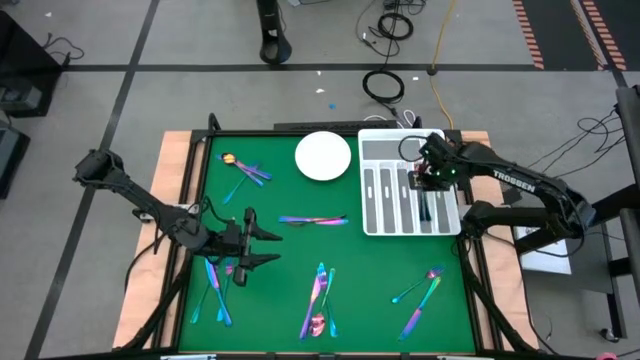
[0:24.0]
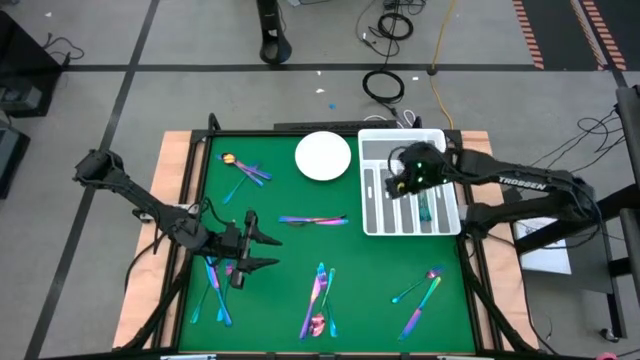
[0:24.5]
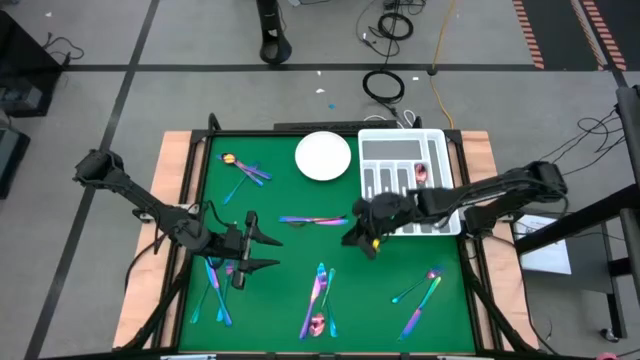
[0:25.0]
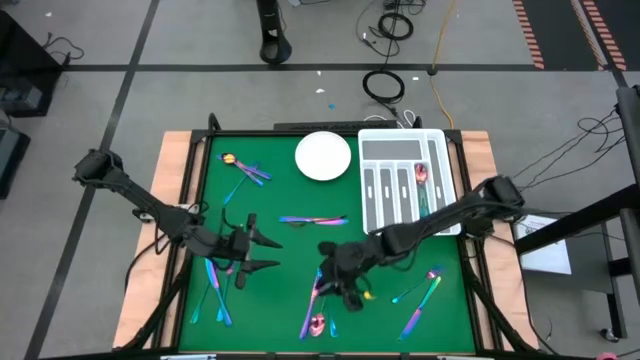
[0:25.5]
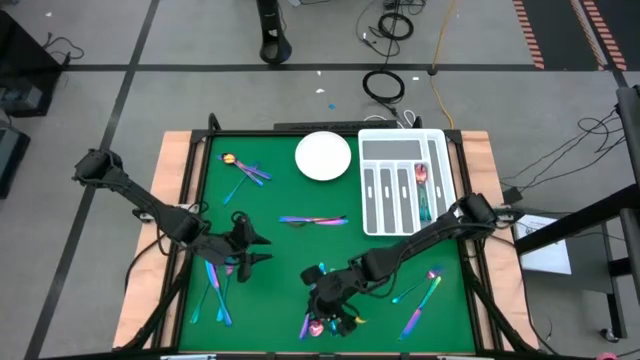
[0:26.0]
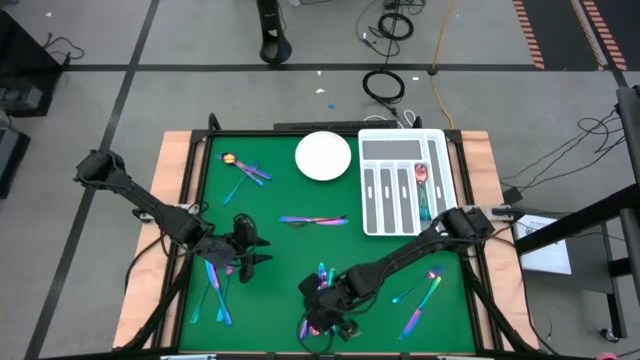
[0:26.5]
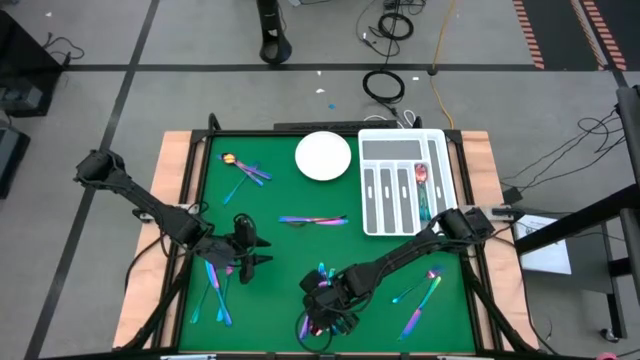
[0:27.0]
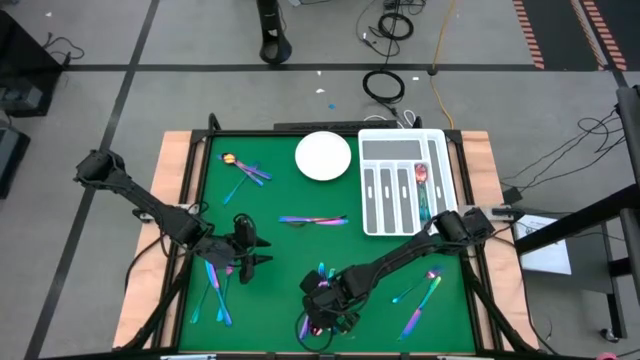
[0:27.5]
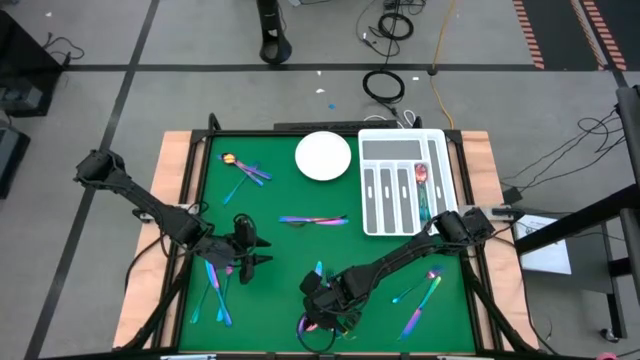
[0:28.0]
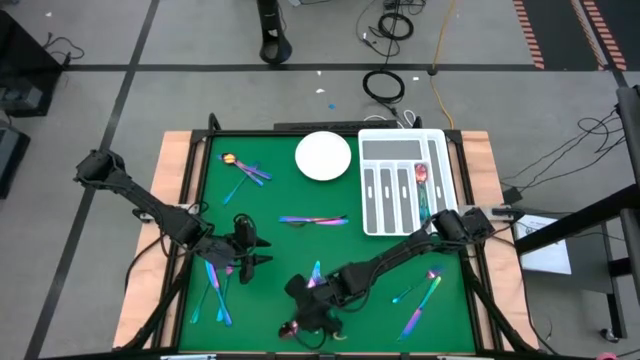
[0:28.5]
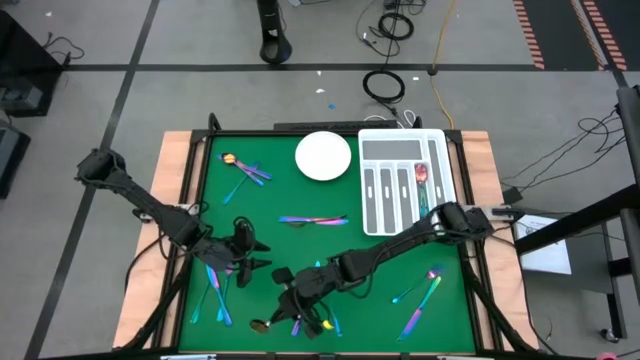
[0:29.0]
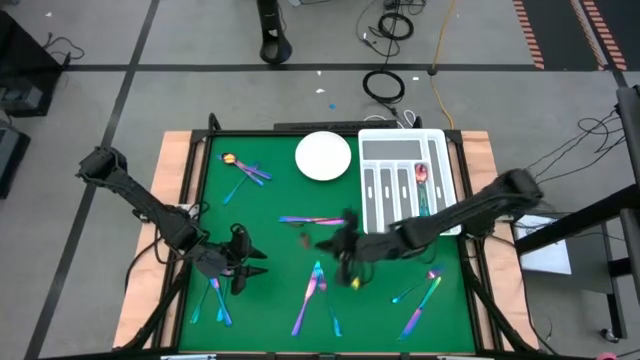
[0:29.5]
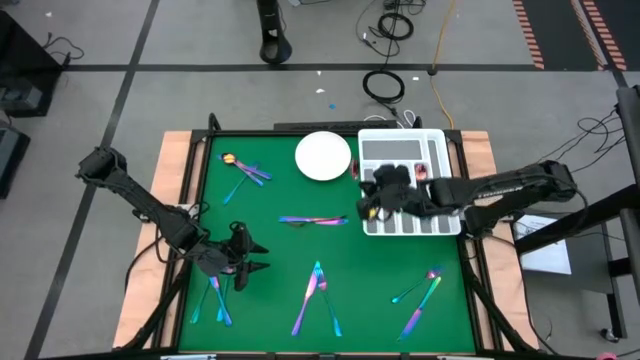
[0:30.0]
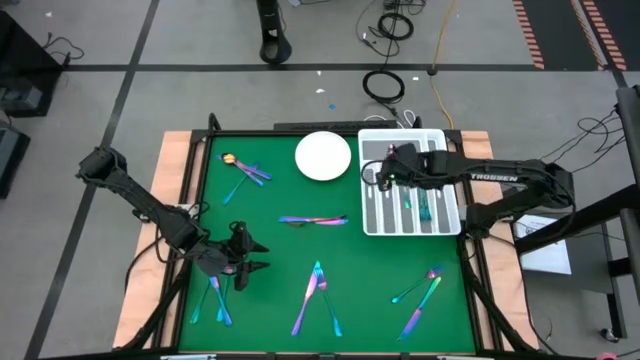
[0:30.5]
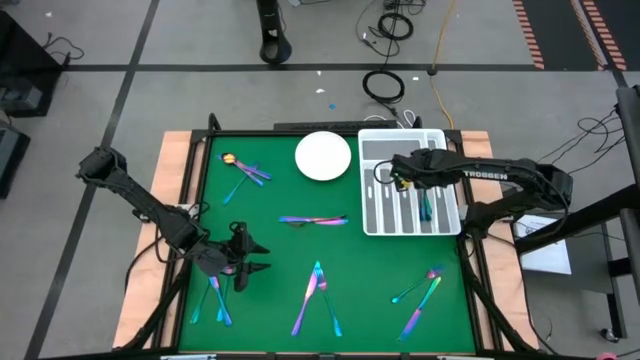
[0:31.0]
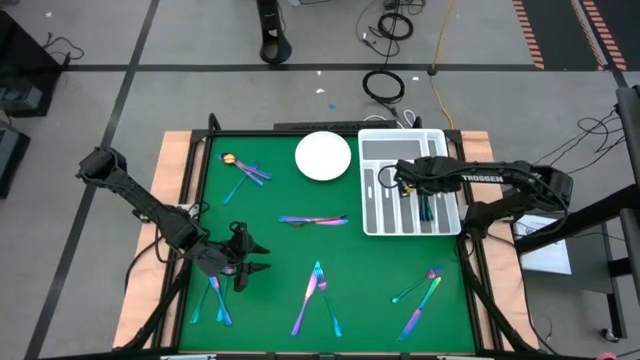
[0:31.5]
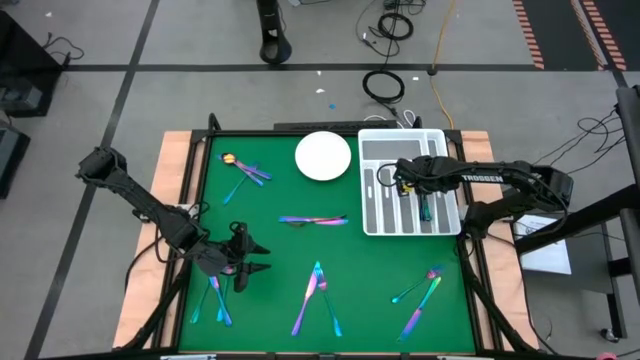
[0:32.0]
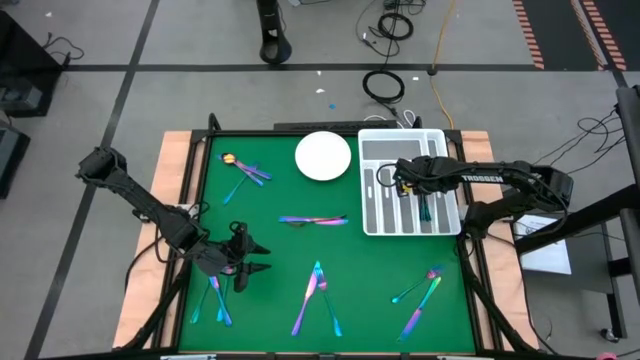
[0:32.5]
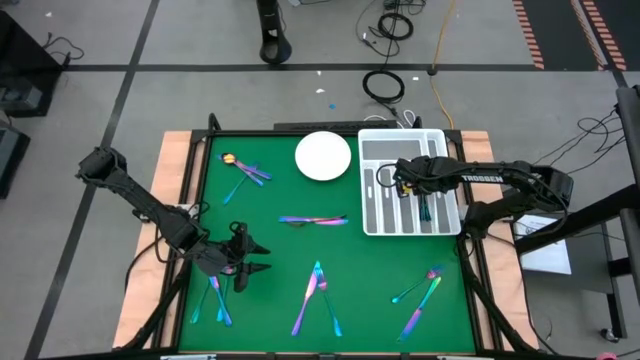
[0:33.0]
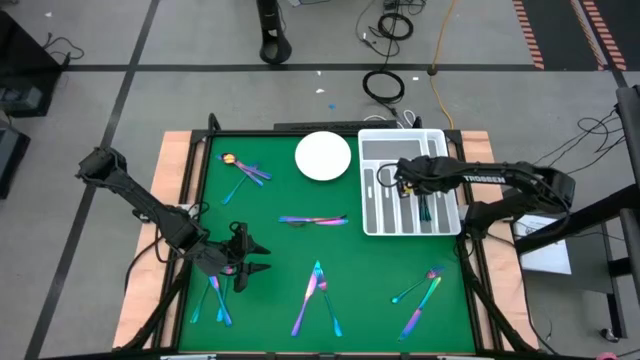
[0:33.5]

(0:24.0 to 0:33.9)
Task: Sort silverware
Put the iridescent spoon into the white silverware tray

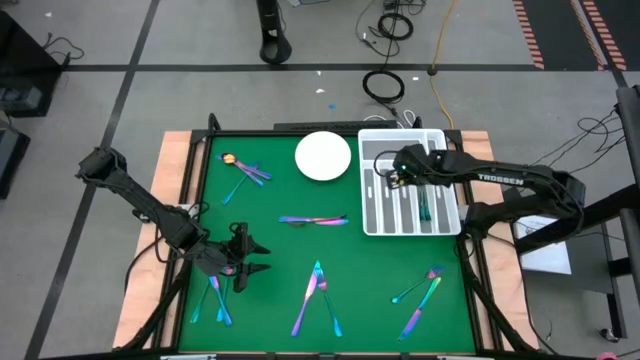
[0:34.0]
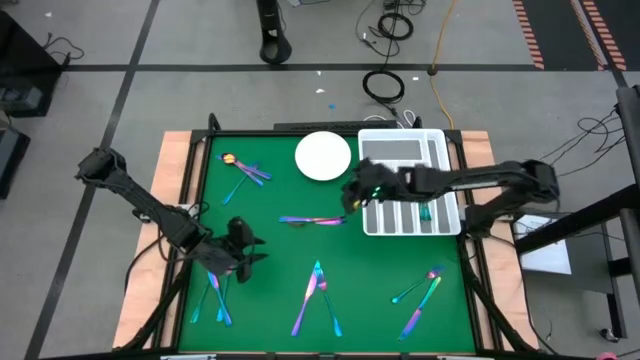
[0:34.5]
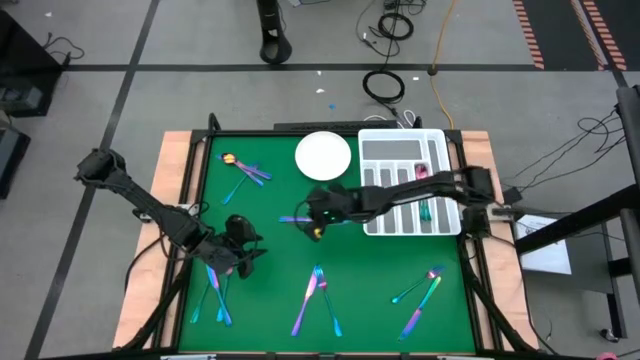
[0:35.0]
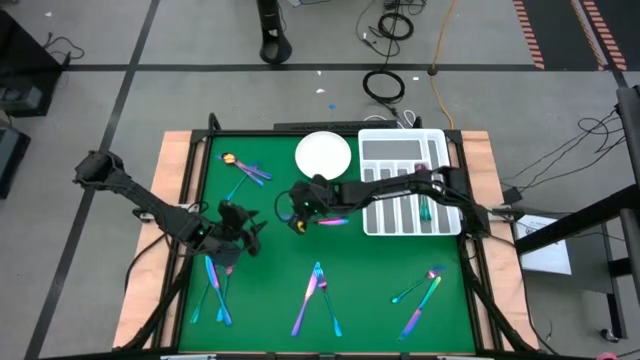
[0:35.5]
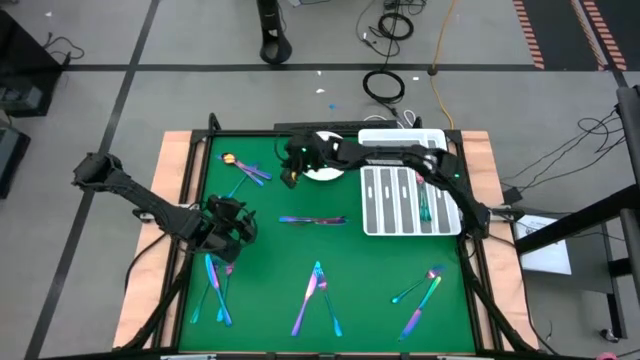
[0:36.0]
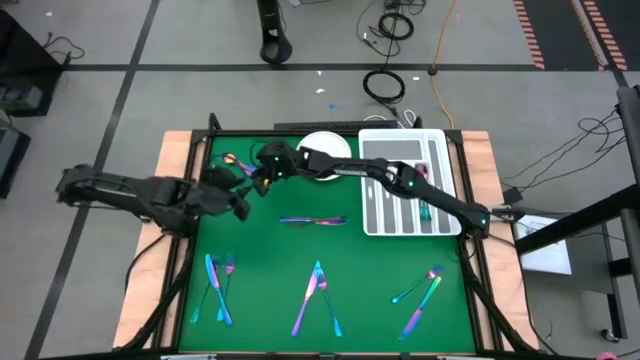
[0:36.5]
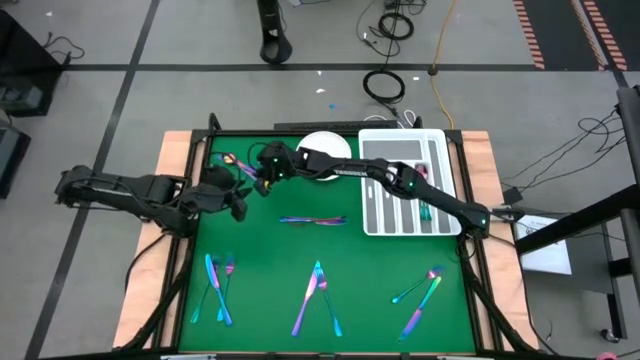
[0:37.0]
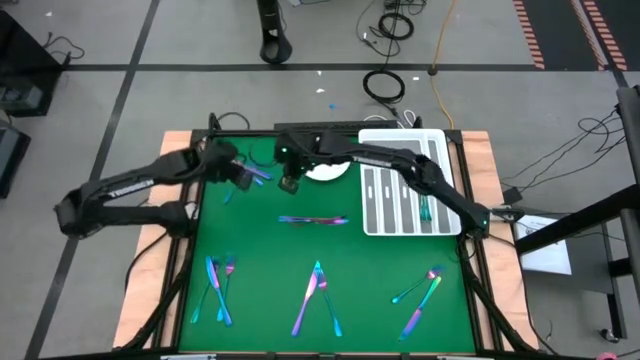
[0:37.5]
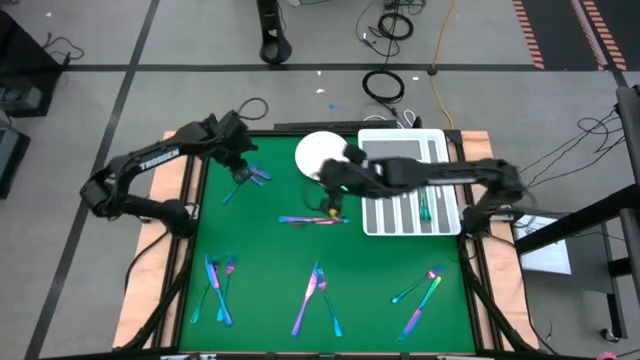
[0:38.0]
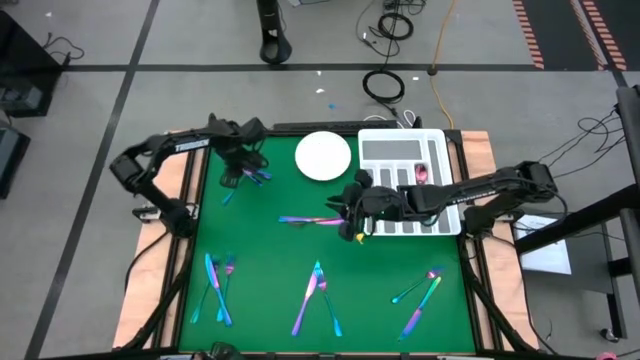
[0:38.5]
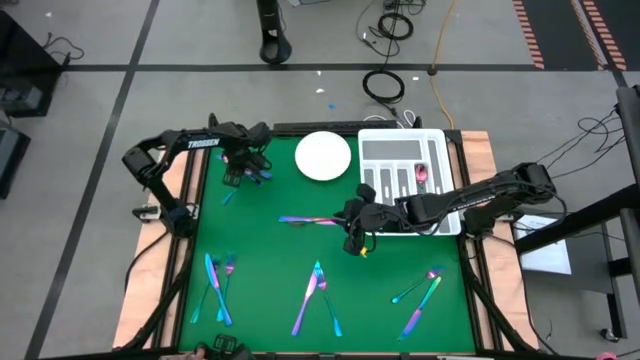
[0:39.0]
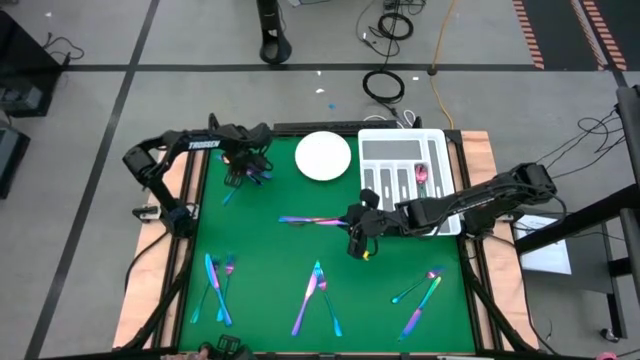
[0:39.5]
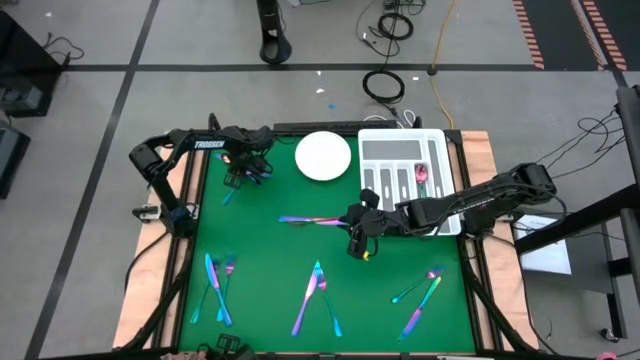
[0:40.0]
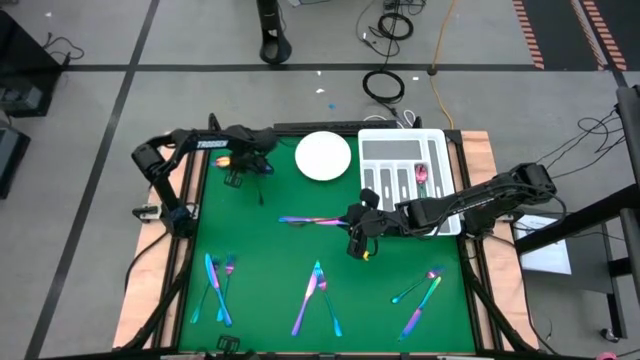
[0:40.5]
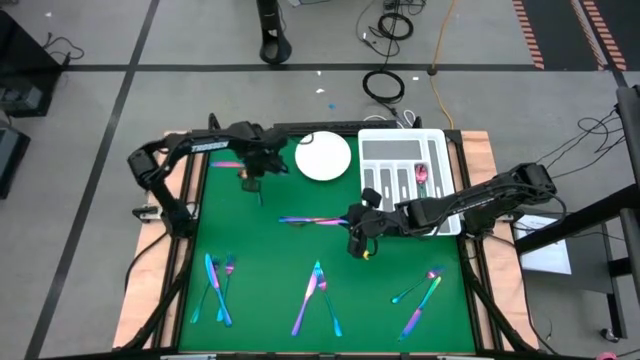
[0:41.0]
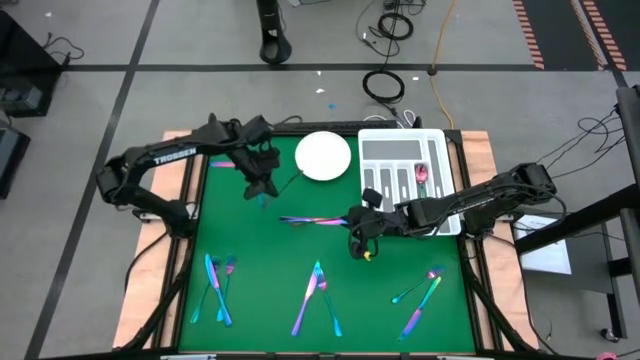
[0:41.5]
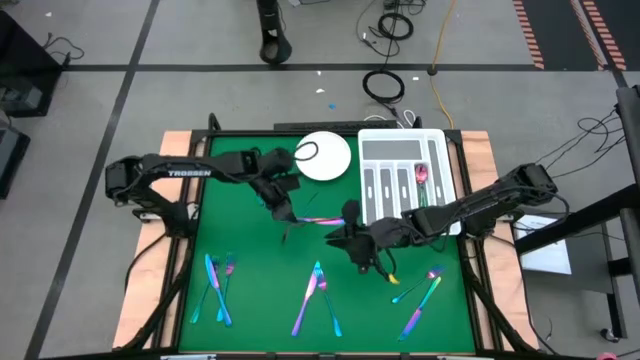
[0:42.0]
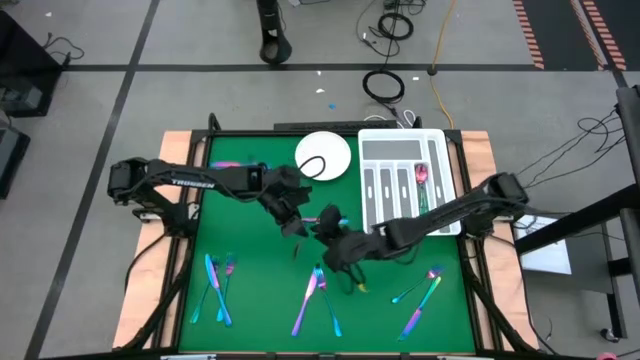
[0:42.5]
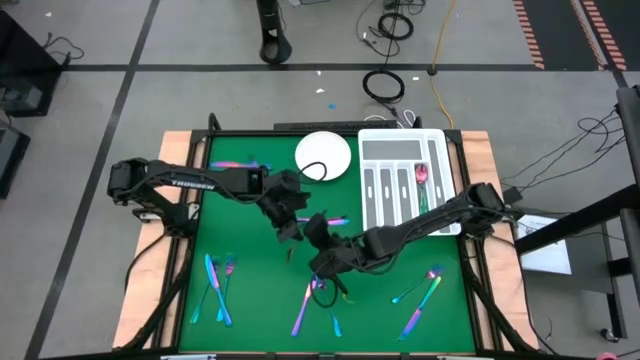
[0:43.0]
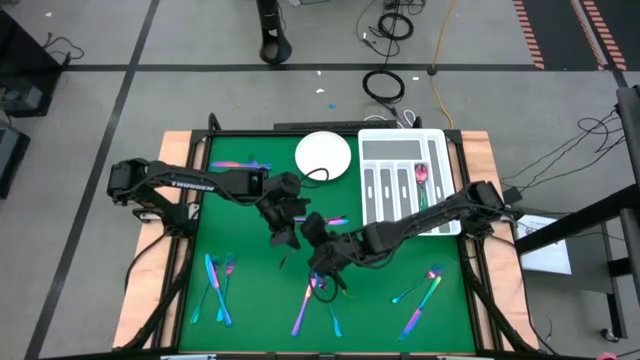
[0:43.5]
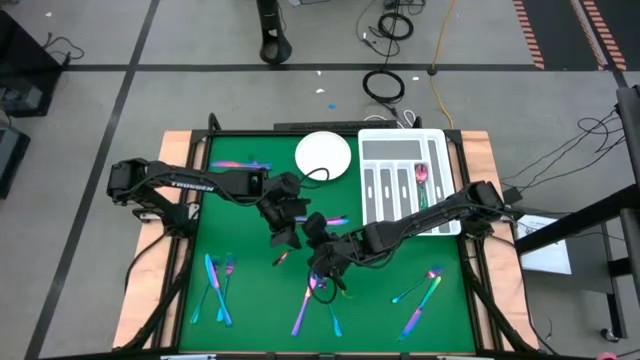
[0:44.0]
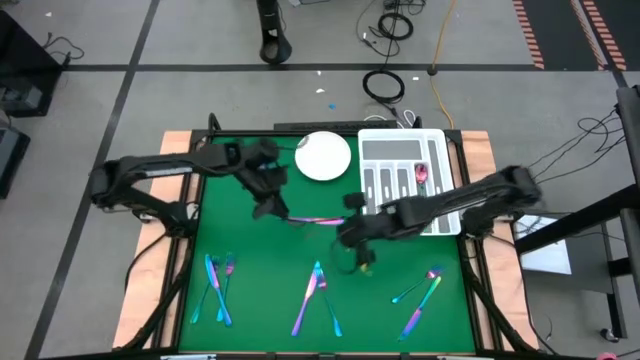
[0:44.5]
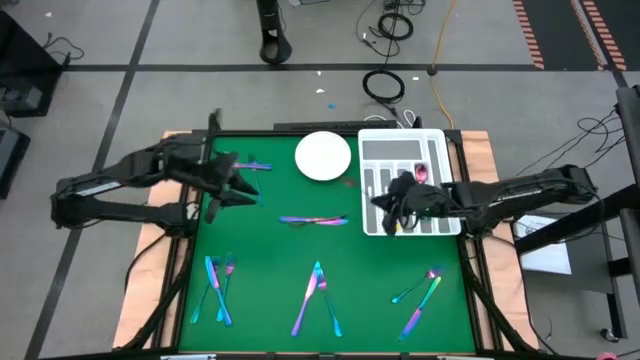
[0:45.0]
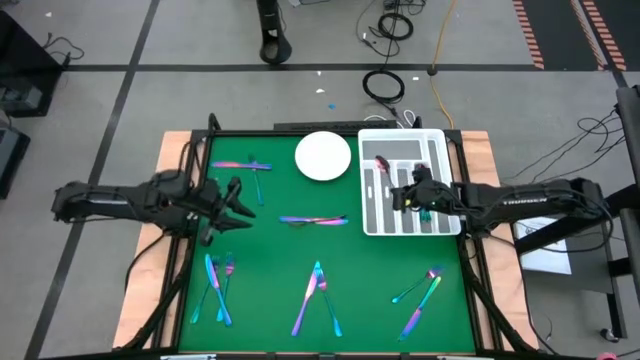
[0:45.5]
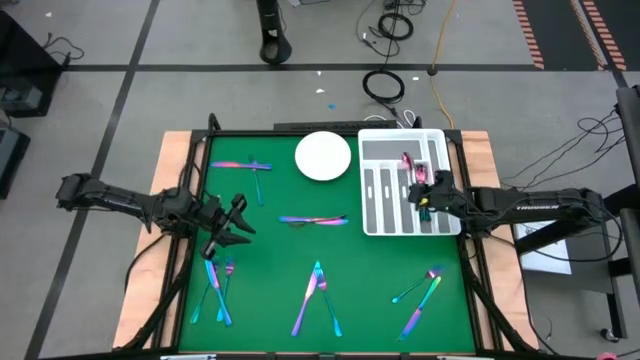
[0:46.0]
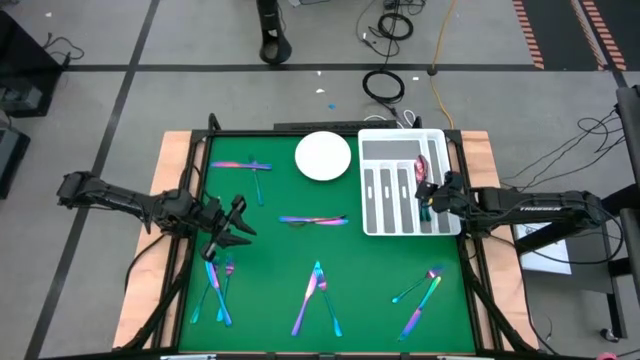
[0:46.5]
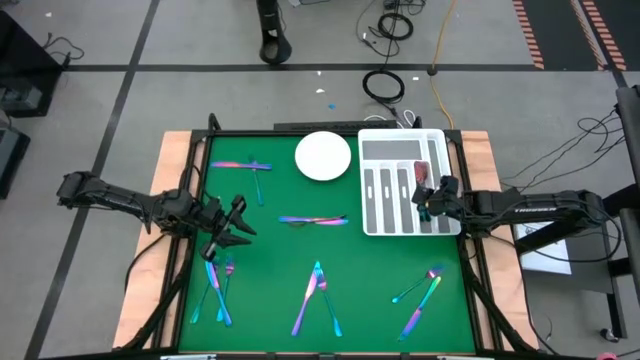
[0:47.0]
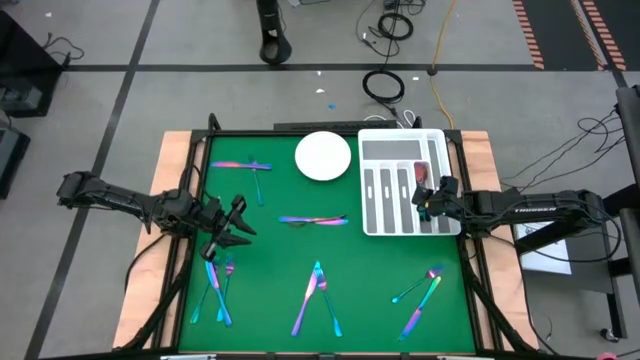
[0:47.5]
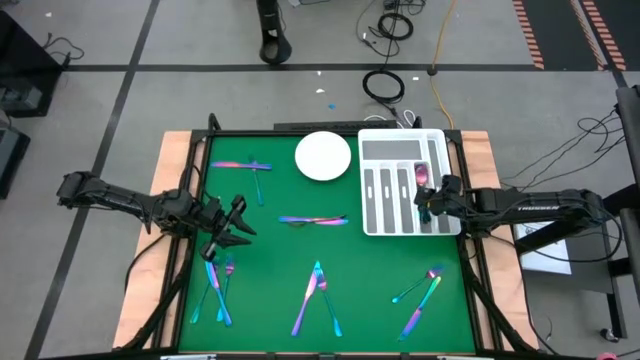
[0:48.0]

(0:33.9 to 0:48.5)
Put the iridescent spoon into the white silverware tray
